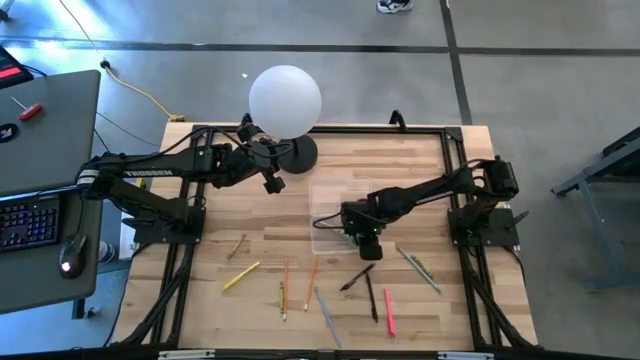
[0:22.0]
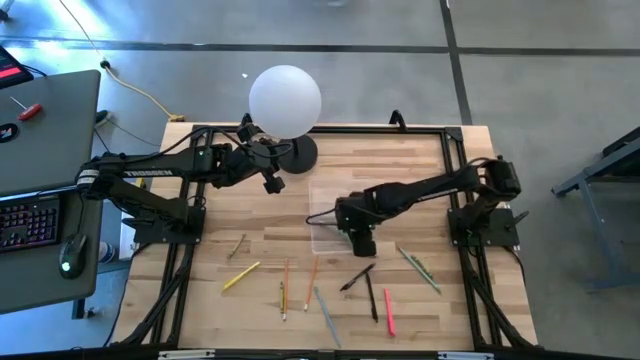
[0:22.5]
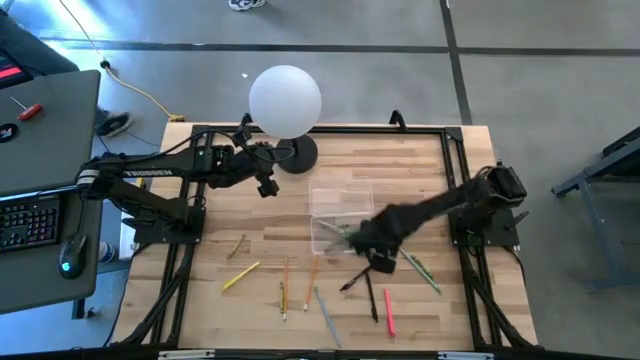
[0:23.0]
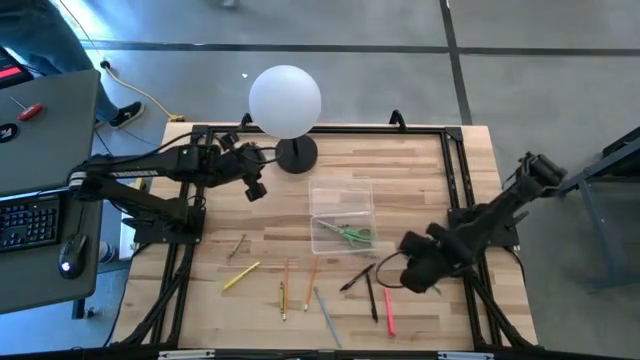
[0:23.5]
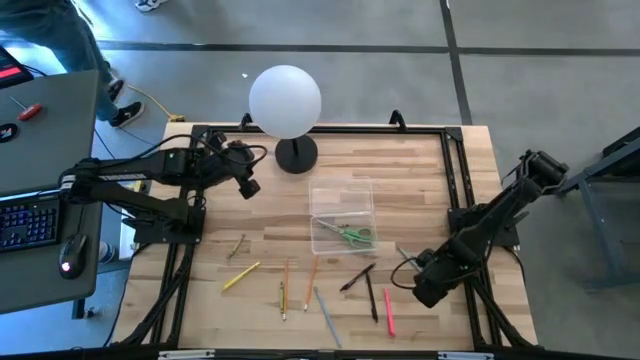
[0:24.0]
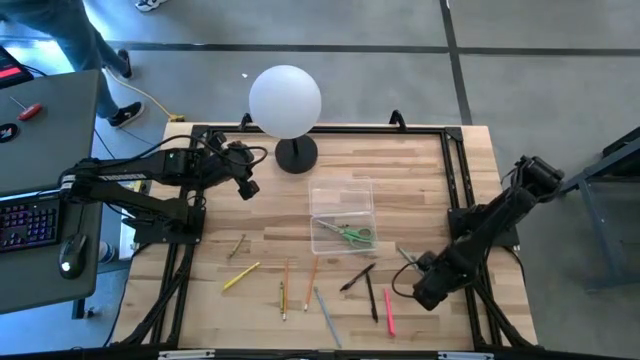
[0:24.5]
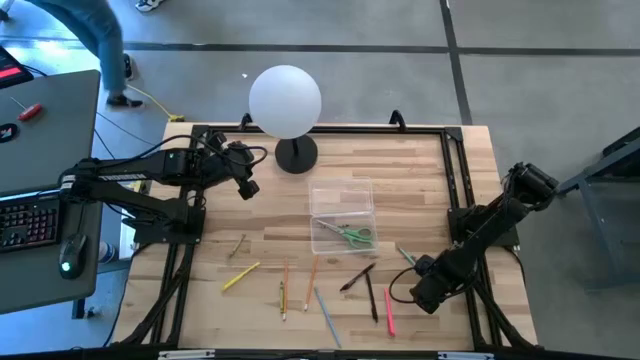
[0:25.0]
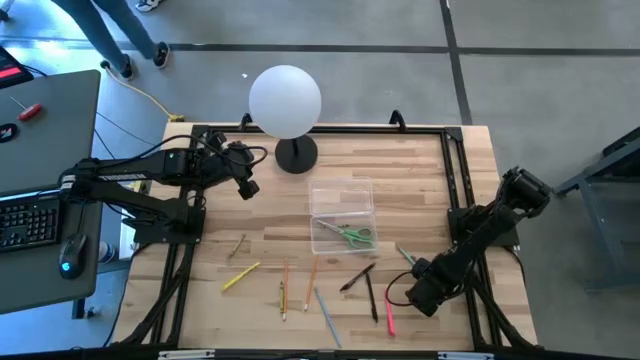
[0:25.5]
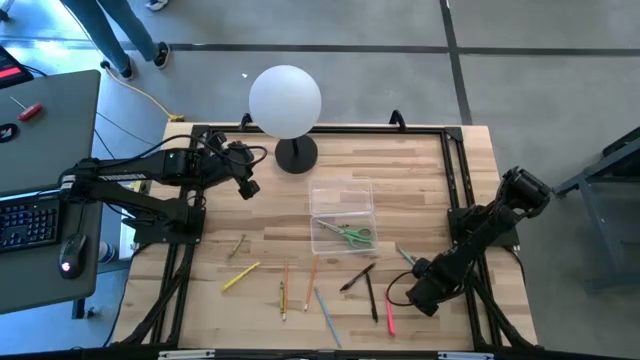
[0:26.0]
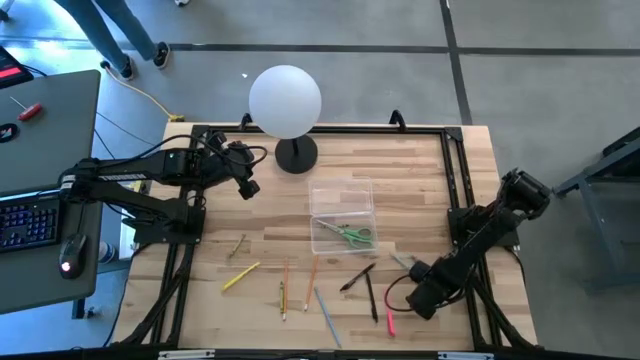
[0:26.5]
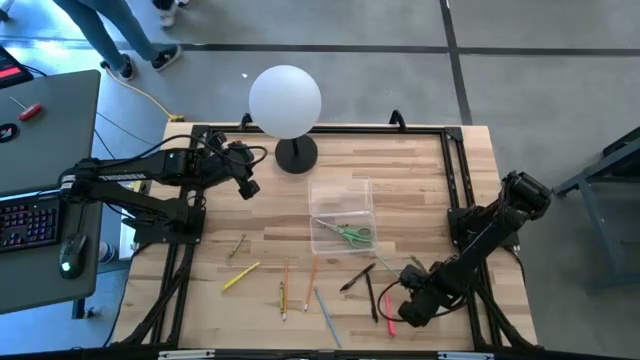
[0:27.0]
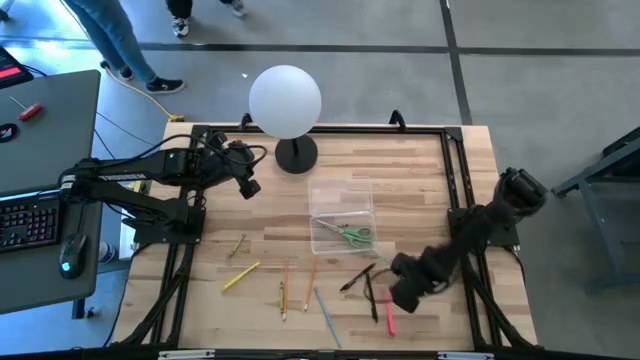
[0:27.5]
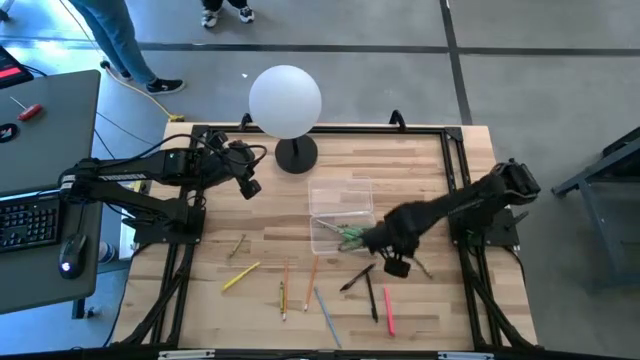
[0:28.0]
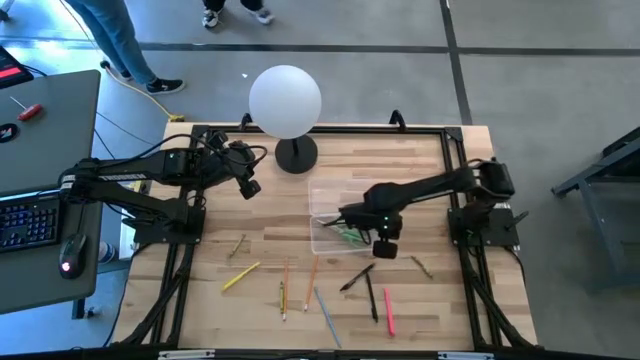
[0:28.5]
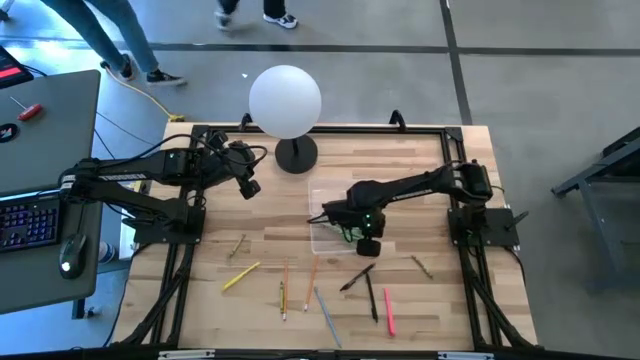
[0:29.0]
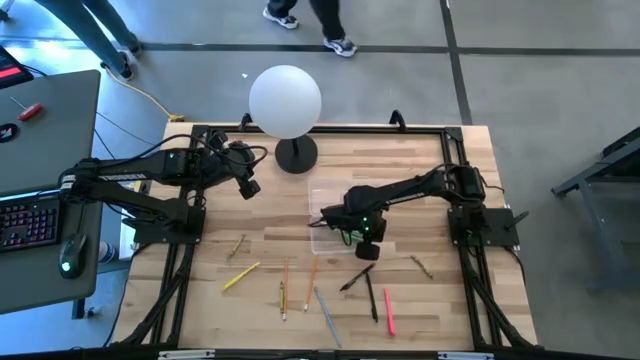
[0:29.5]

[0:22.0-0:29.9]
Task: Pick & place school supplies into a supply box
Put the light blue pencil into the transparent supply box

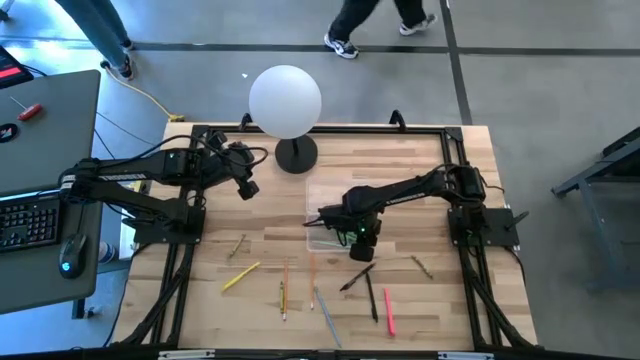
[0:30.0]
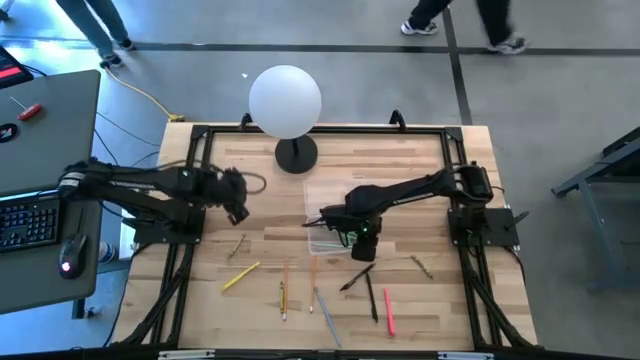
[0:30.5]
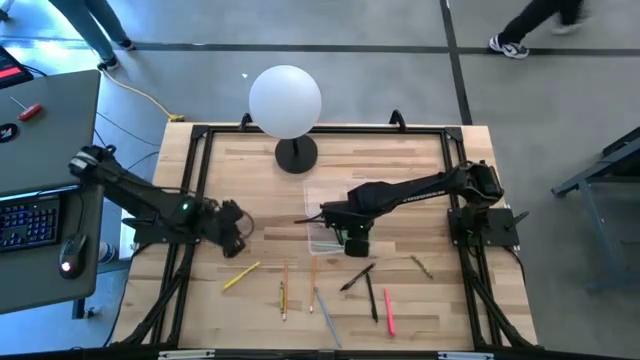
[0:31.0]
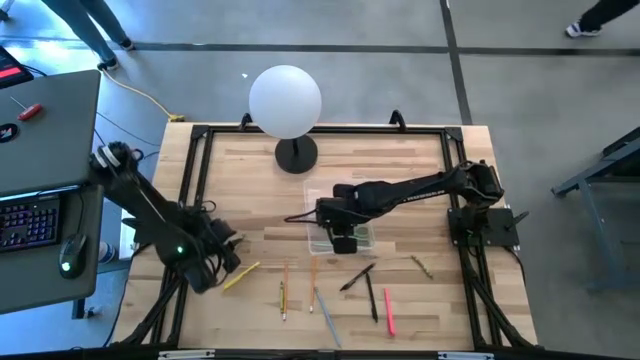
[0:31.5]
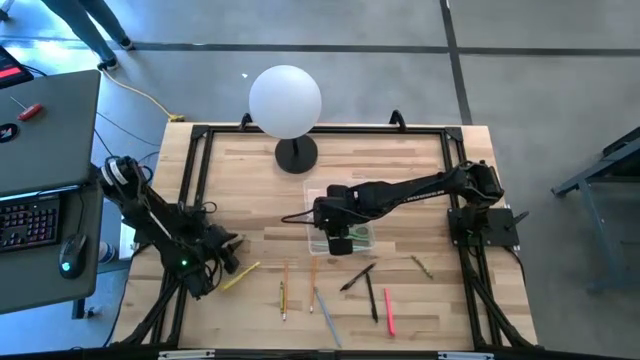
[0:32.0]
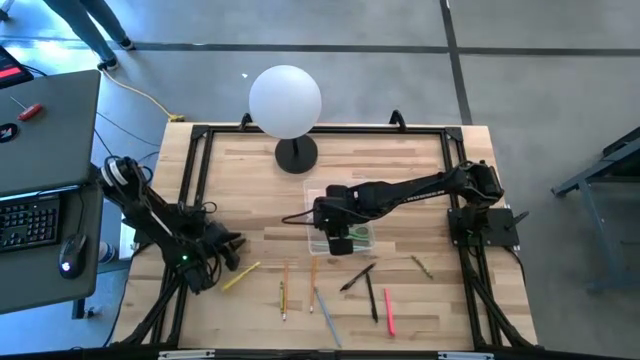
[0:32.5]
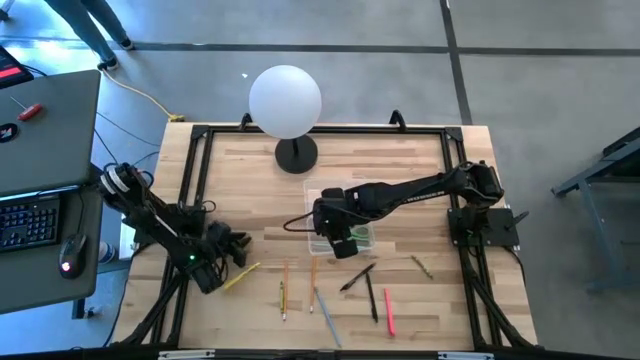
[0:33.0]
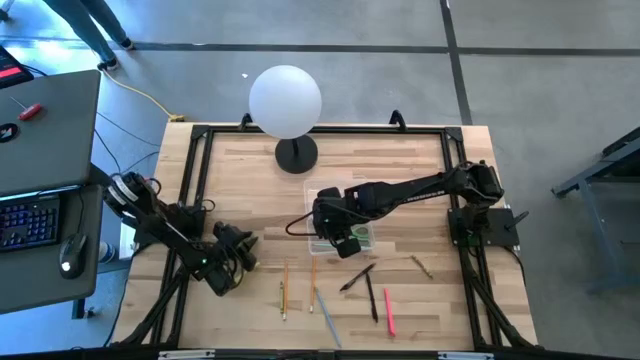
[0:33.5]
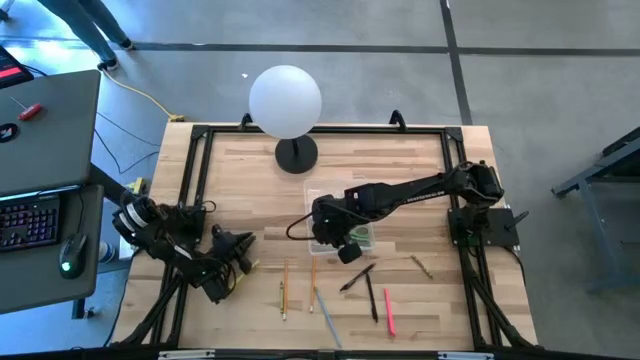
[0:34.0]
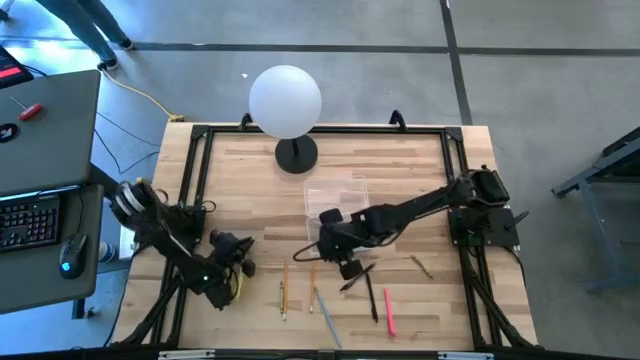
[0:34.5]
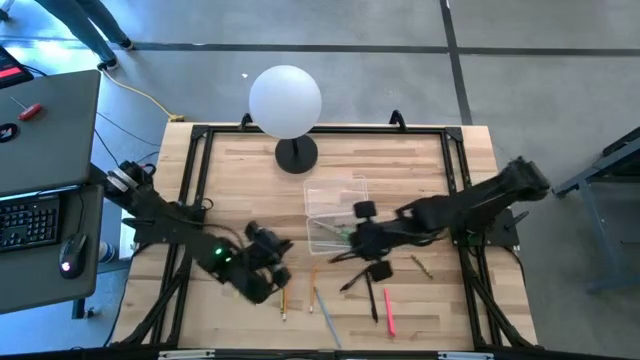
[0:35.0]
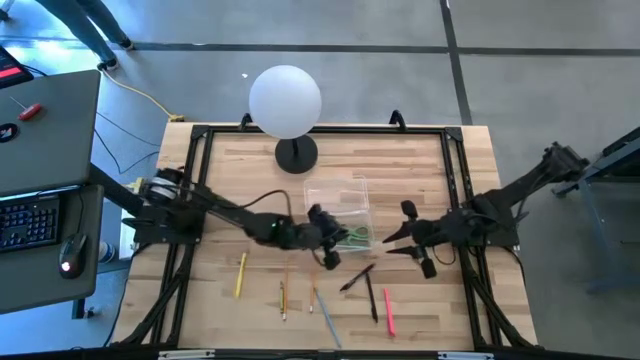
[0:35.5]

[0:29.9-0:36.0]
Put the green crayon into the transparent supply box

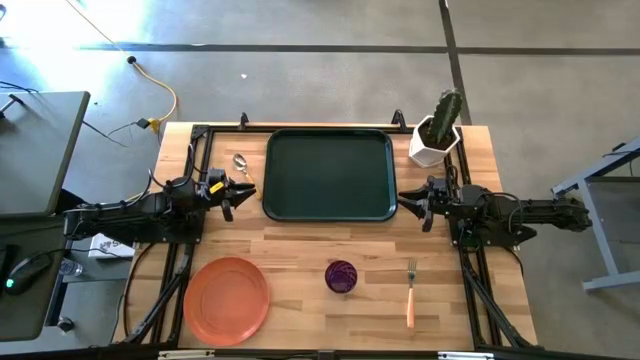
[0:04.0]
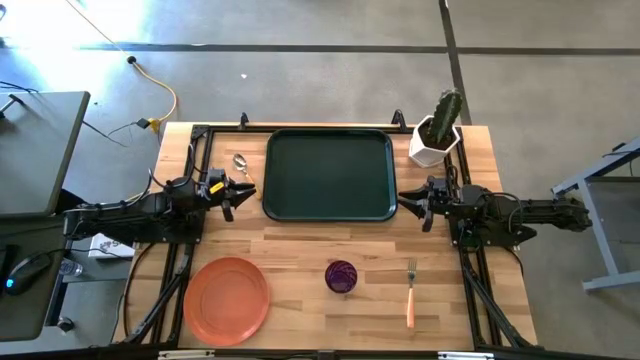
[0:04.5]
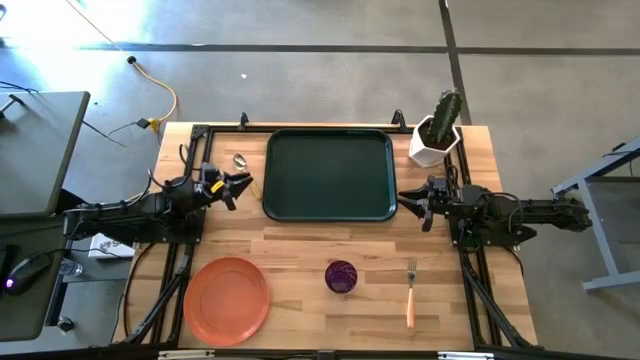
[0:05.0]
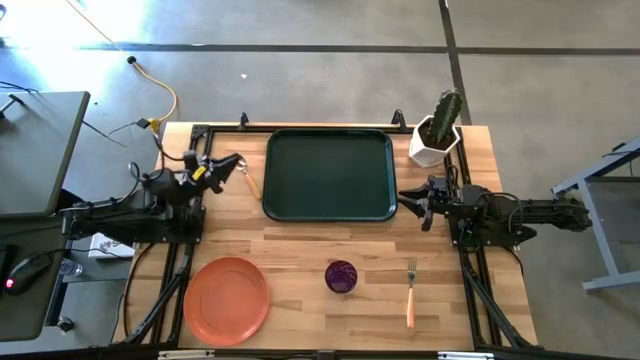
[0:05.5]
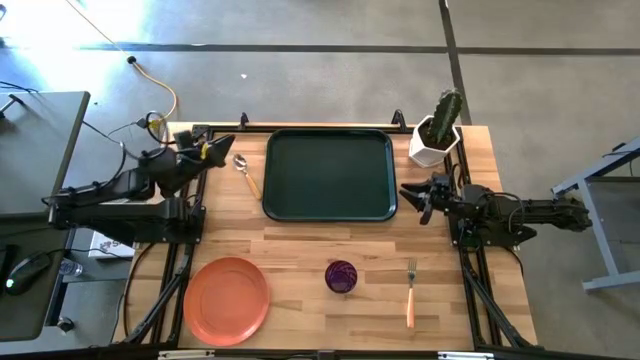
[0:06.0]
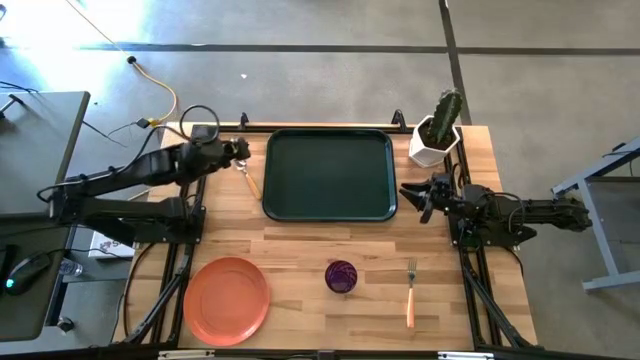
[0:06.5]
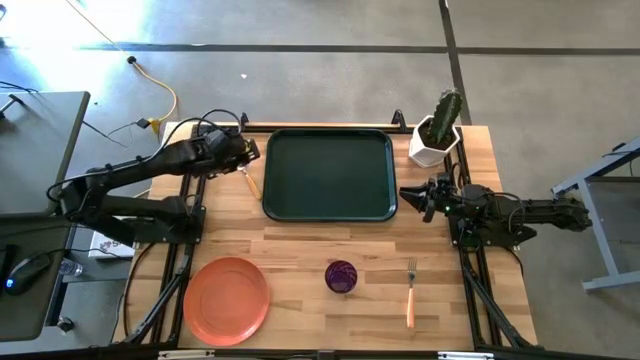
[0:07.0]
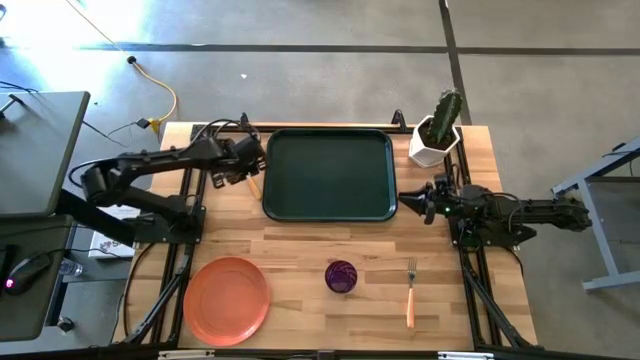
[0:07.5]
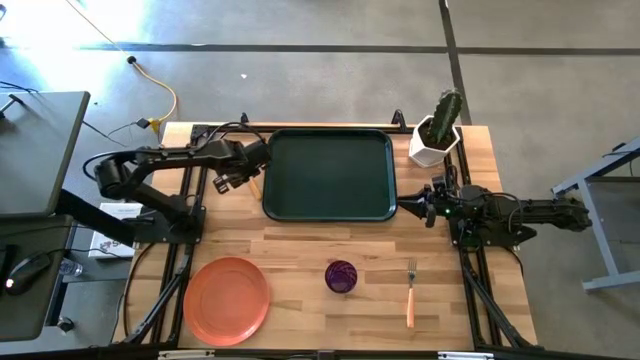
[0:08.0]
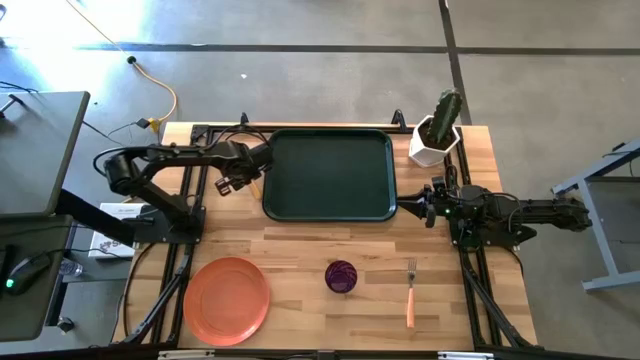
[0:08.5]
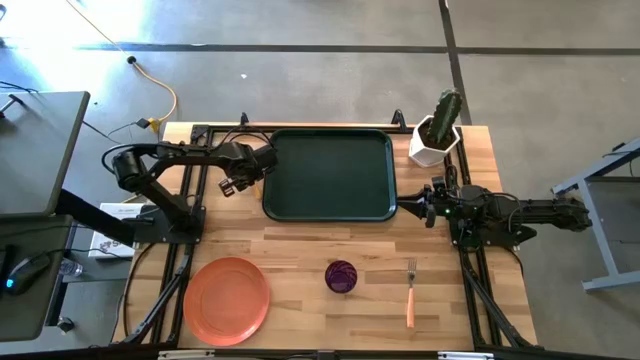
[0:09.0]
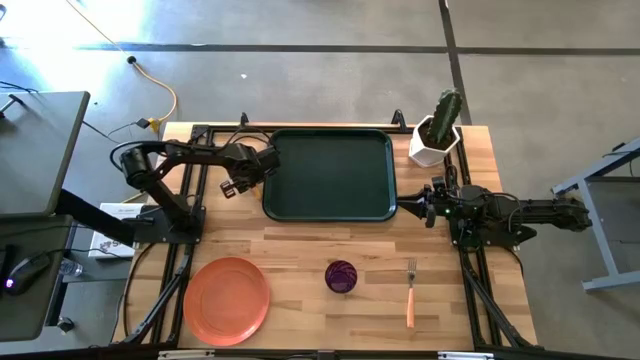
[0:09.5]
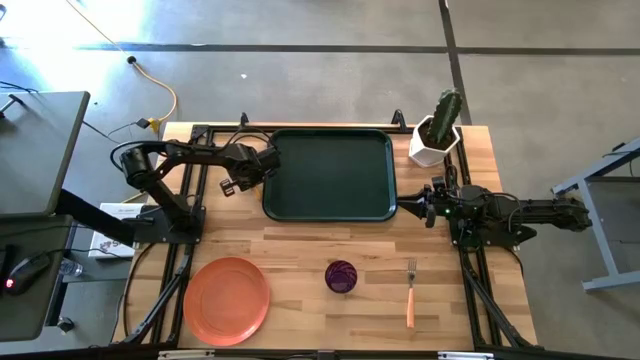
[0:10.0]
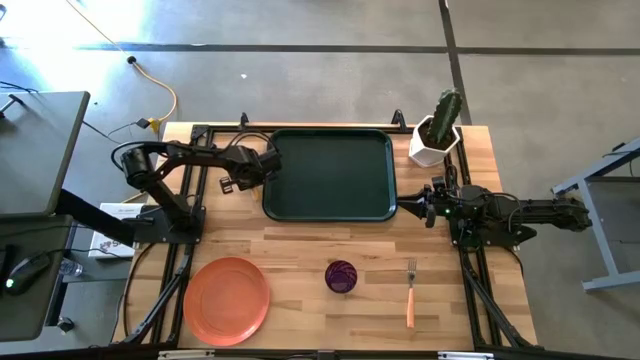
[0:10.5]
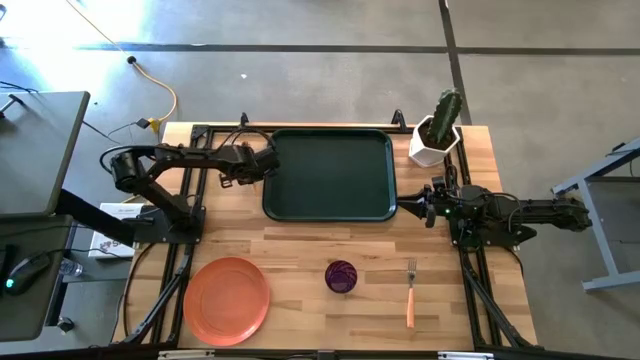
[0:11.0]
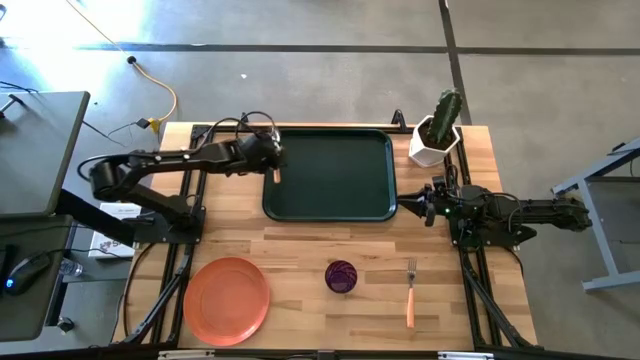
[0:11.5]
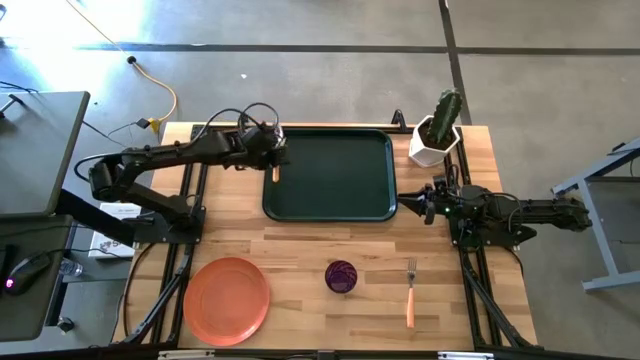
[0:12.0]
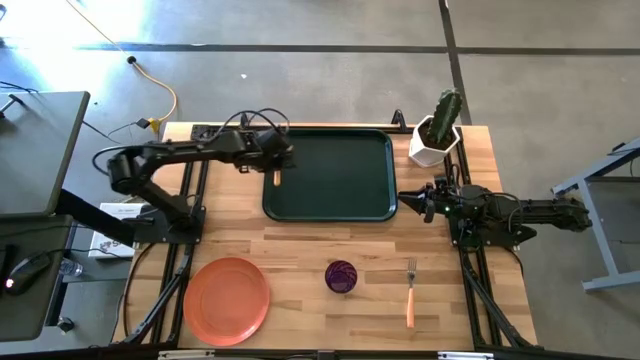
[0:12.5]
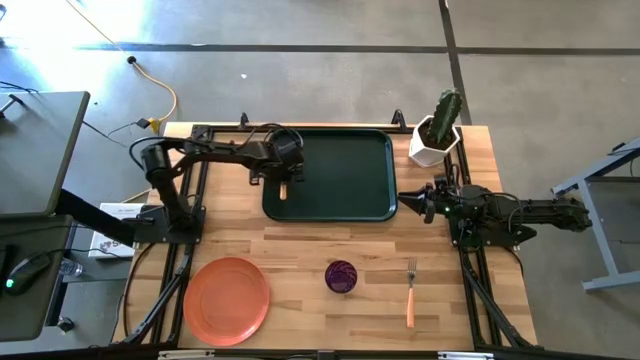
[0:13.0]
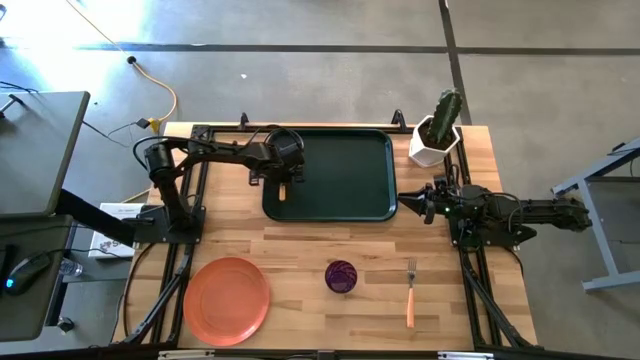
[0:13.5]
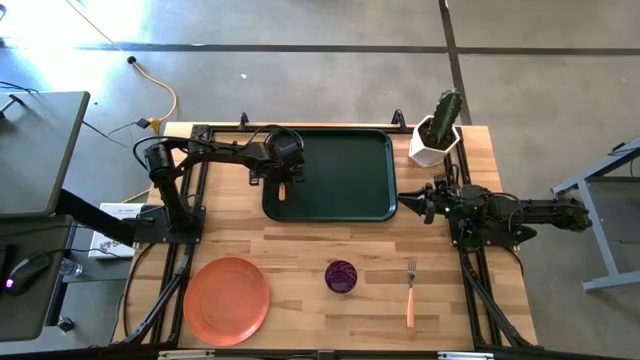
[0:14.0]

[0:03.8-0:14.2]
Task: Pick and place plate/cup/fork/spoon on tray
Put the orange spoon on the left side of the black tray
